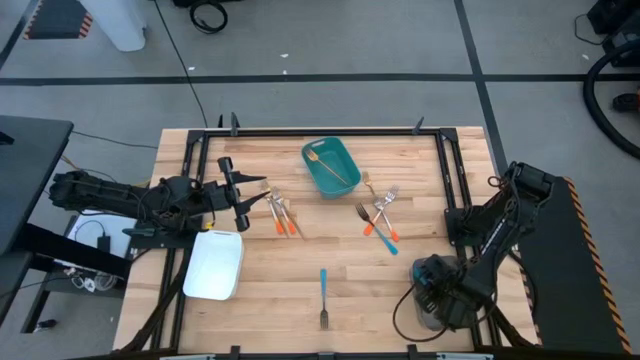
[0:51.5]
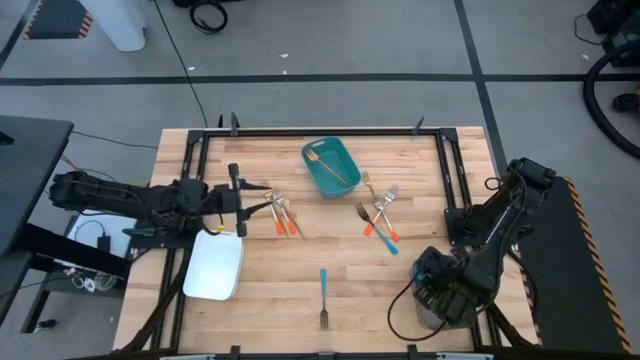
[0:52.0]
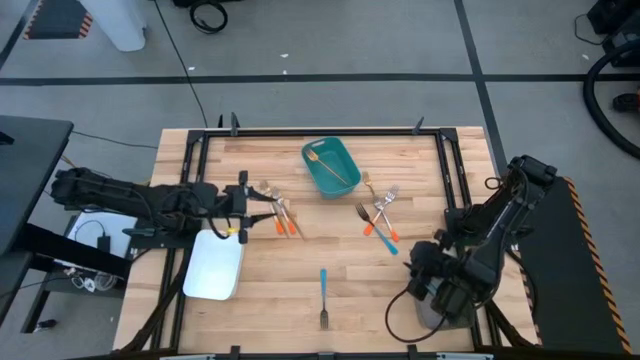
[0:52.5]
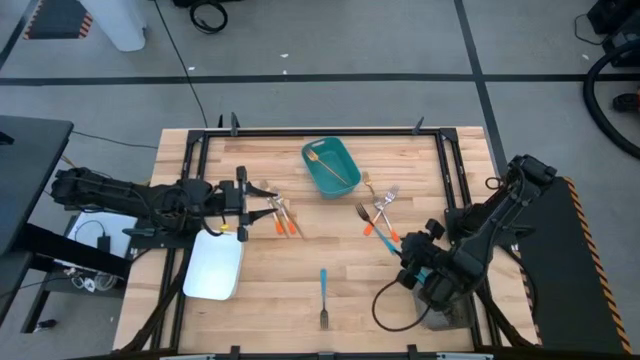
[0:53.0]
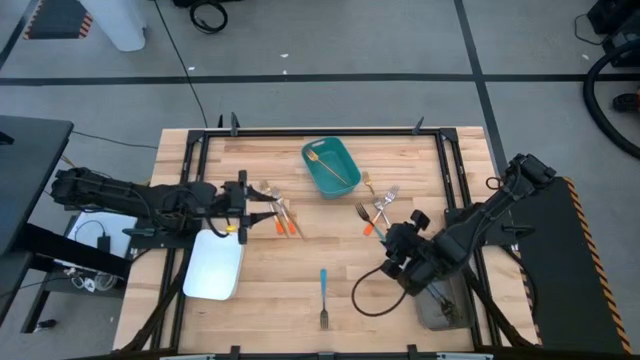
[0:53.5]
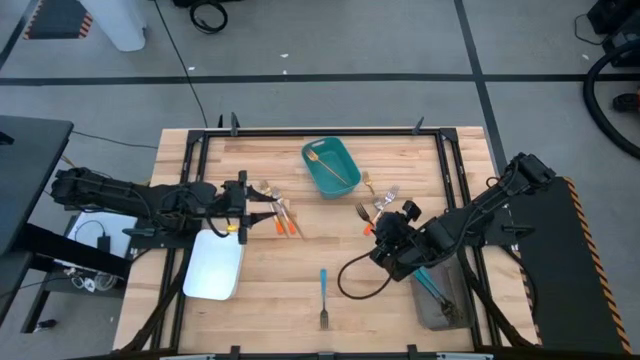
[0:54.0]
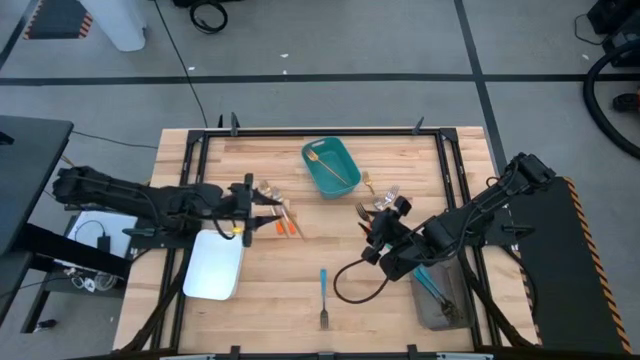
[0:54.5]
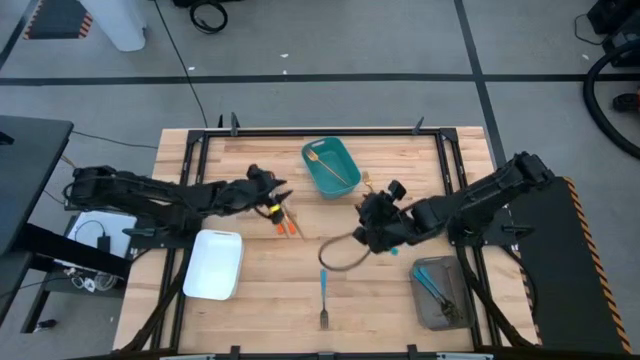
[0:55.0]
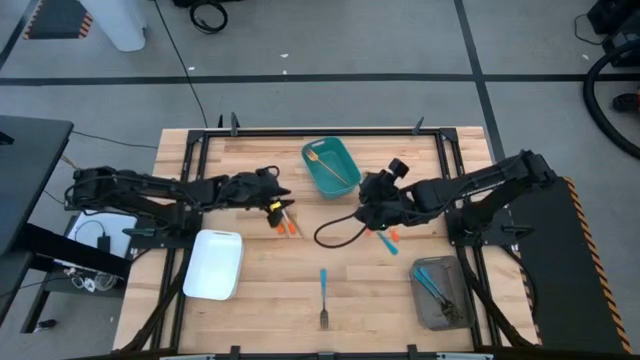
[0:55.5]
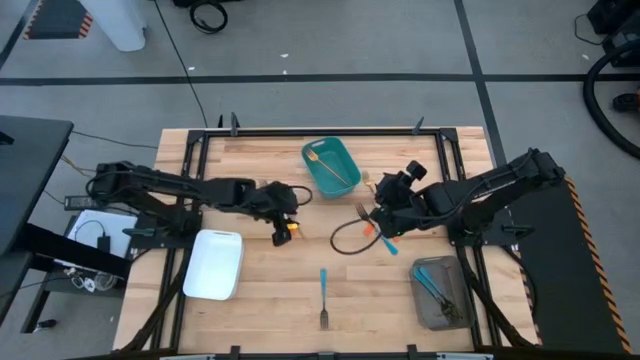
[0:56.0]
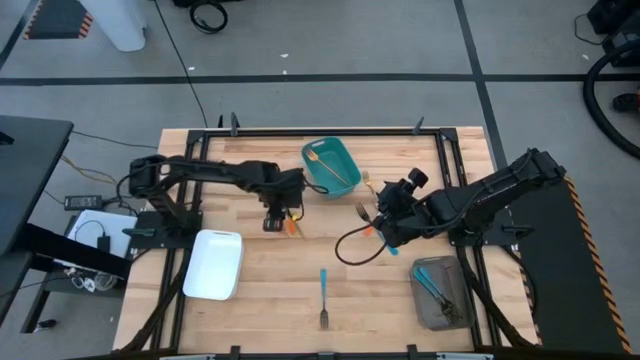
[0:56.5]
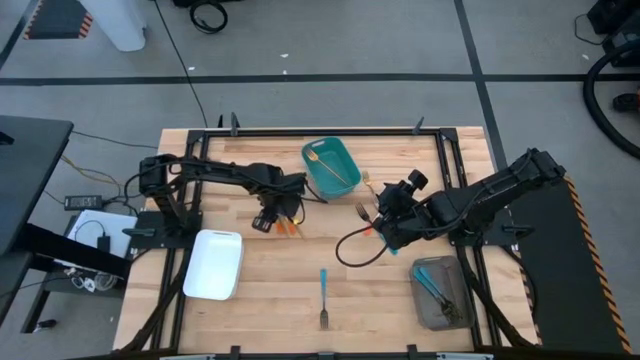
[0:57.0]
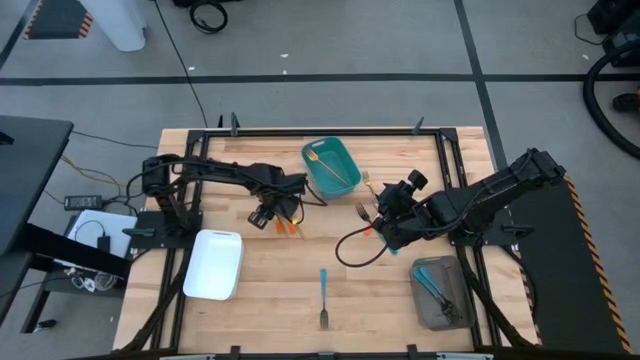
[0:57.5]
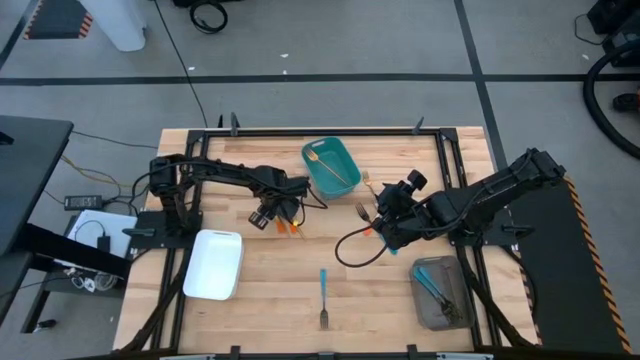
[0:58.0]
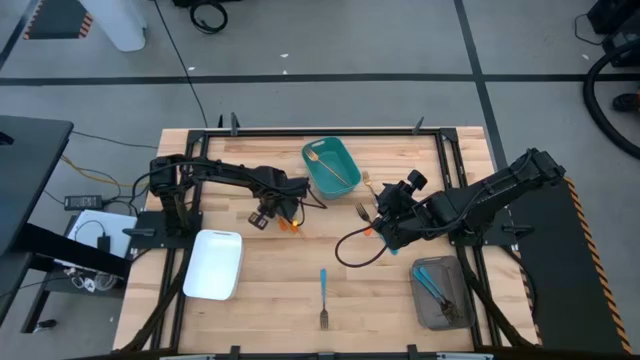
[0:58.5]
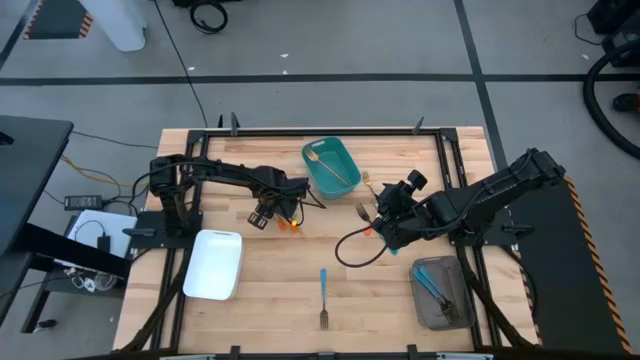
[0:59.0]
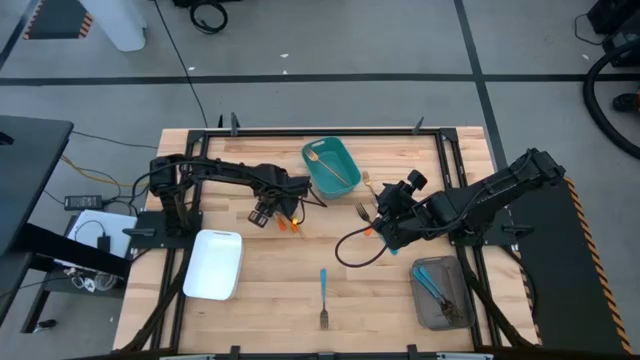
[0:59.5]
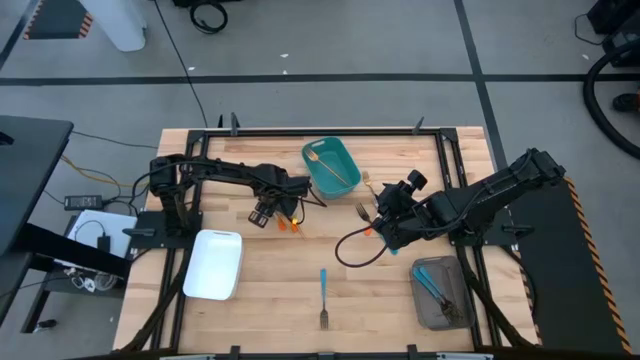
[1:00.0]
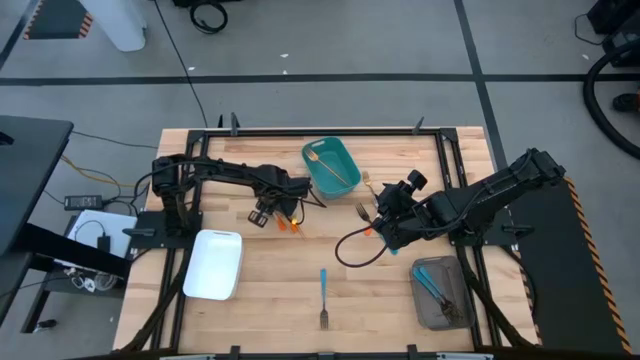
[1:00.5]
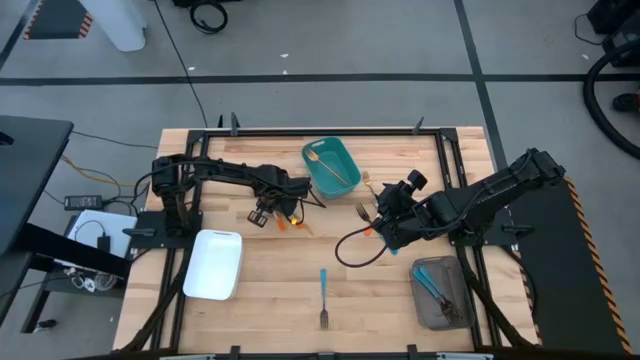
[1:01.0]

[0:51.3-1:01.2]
Task: Sort silverware by color (type)
Put the gold fork into the green bin

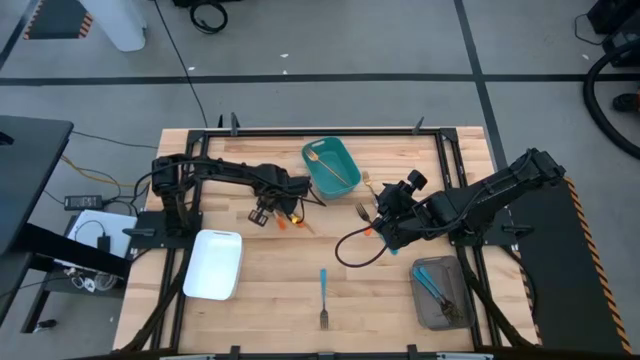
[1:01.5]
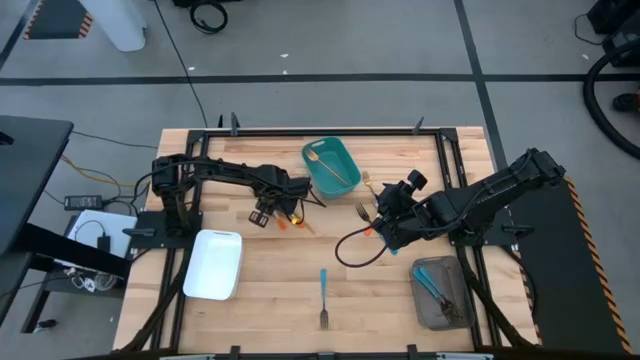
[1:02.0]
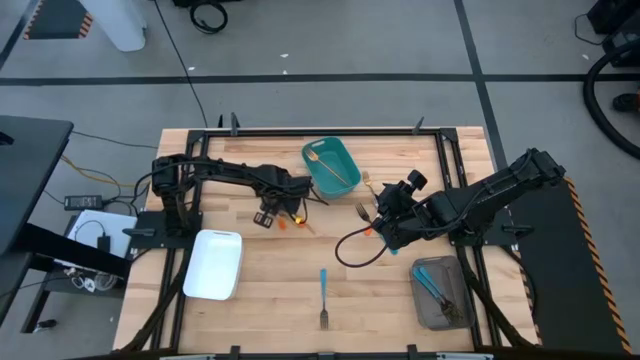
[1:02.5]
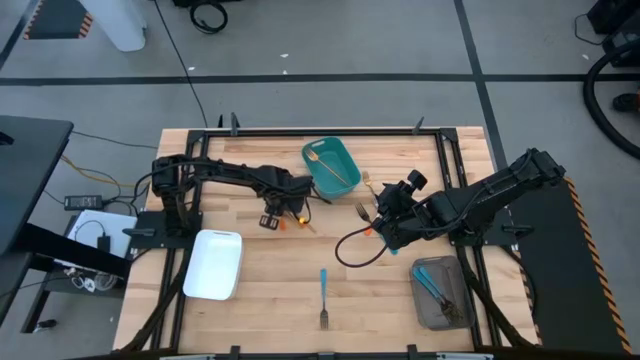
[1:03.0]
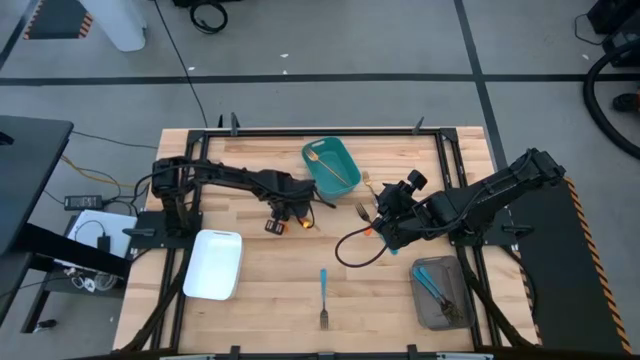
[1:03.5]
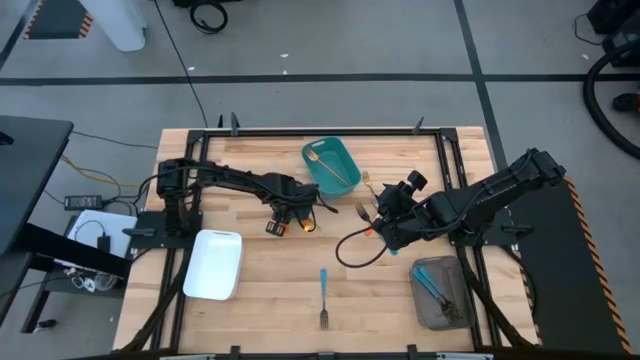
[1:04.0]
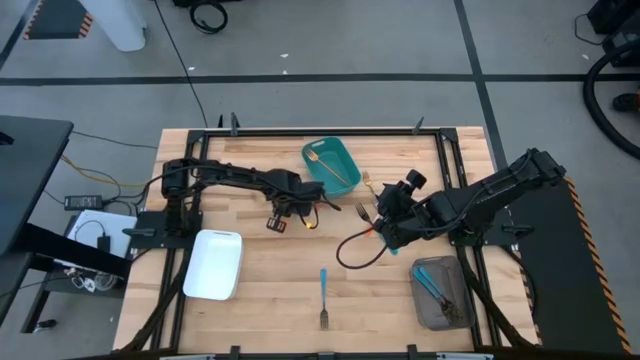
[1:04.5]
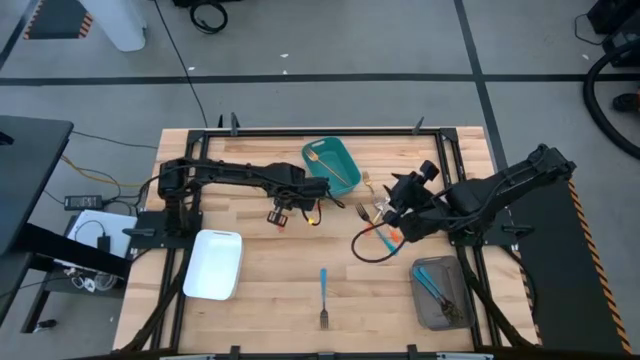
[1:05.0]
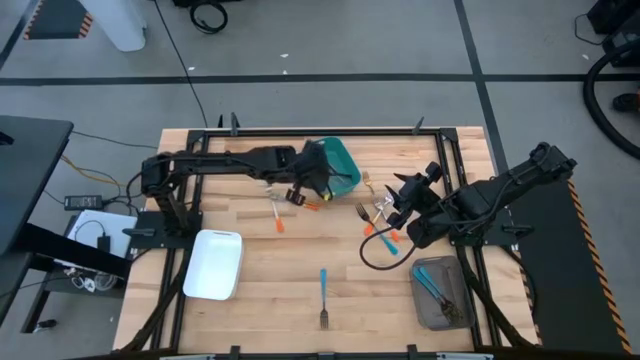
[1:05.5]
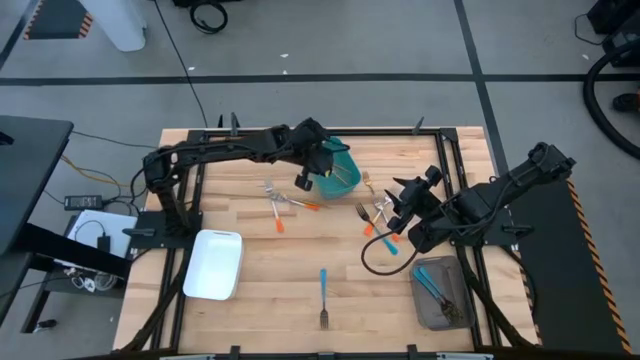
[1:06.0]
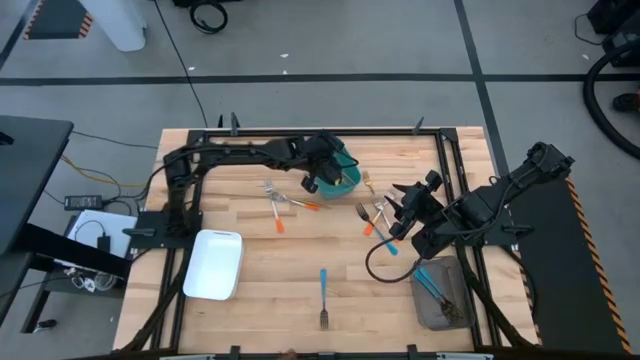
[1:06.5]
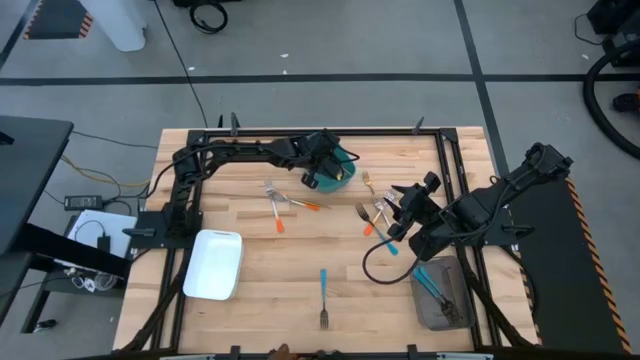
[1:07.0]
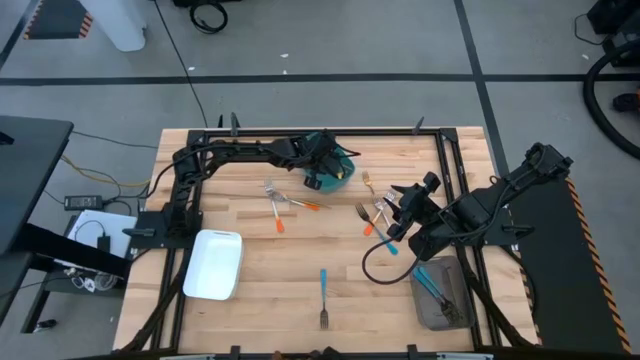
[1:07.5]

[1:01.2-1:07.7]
Put the gold fork into the green bin
